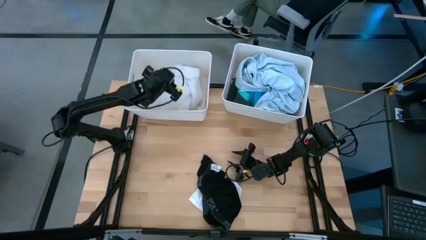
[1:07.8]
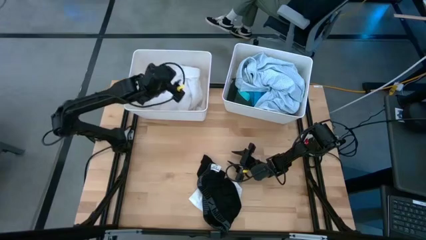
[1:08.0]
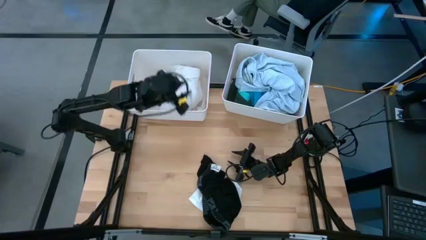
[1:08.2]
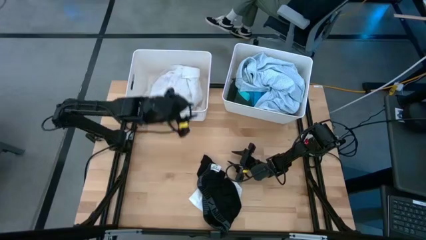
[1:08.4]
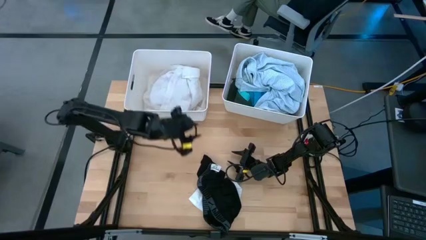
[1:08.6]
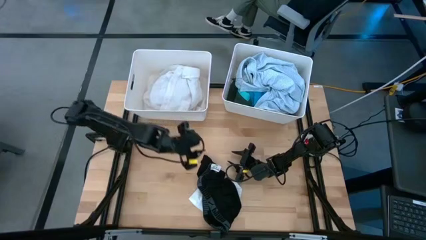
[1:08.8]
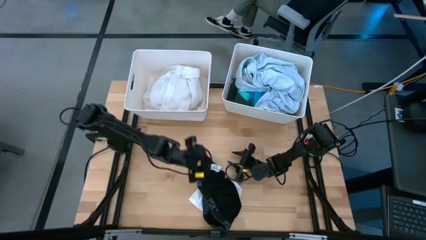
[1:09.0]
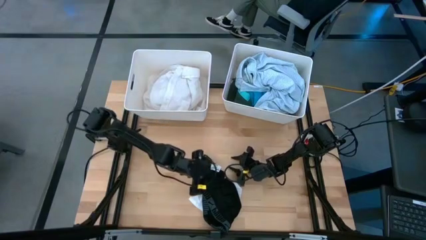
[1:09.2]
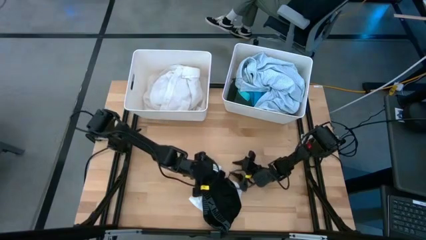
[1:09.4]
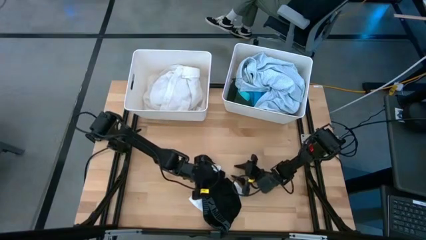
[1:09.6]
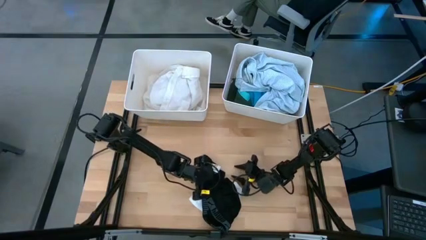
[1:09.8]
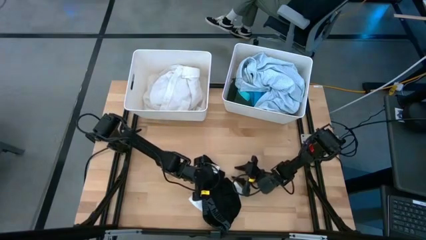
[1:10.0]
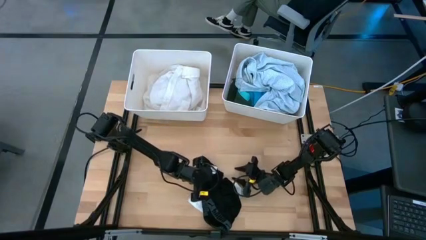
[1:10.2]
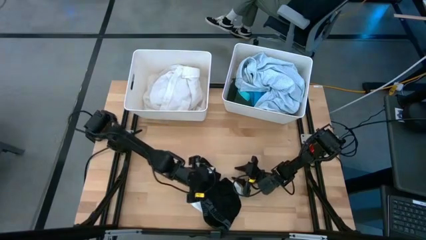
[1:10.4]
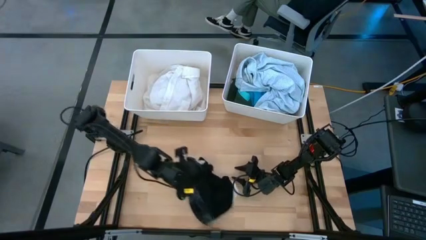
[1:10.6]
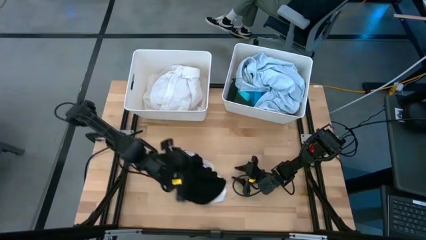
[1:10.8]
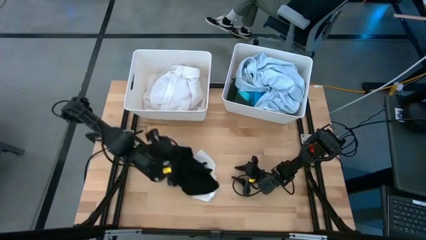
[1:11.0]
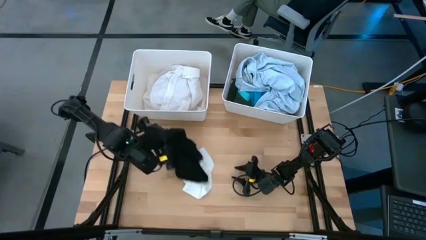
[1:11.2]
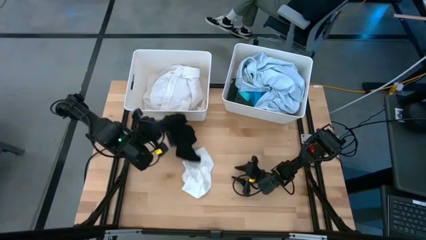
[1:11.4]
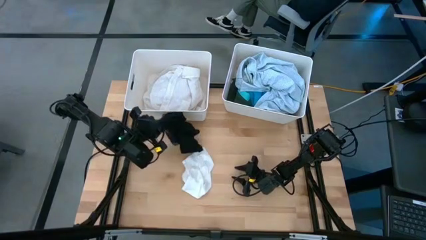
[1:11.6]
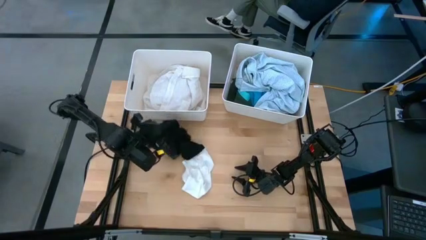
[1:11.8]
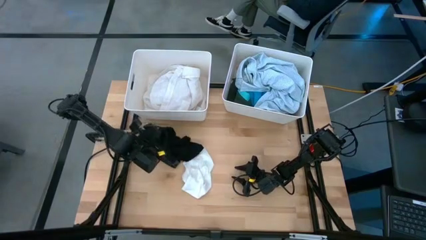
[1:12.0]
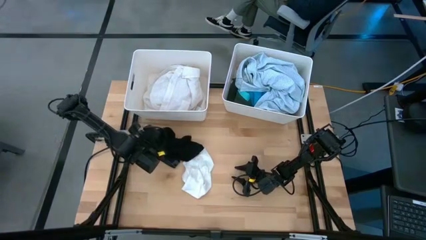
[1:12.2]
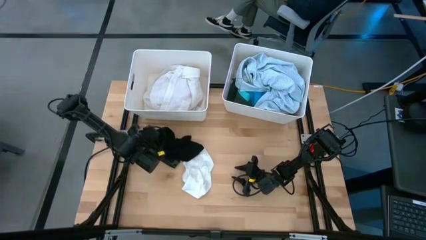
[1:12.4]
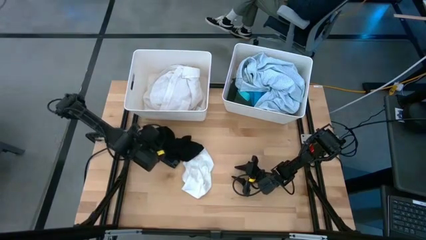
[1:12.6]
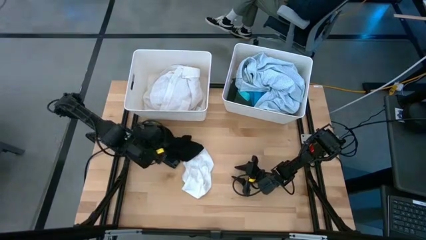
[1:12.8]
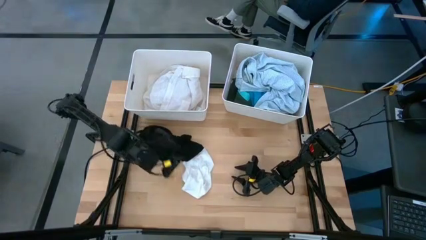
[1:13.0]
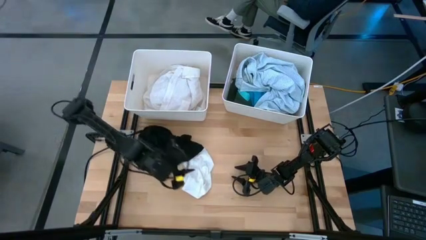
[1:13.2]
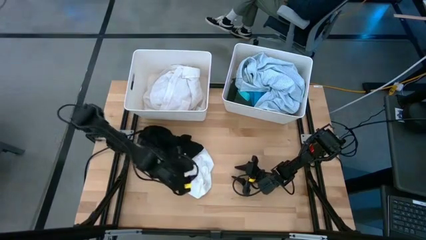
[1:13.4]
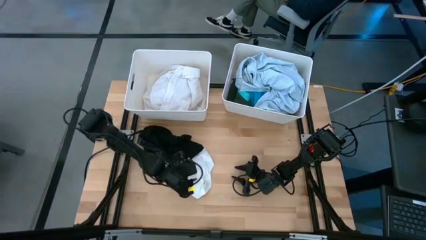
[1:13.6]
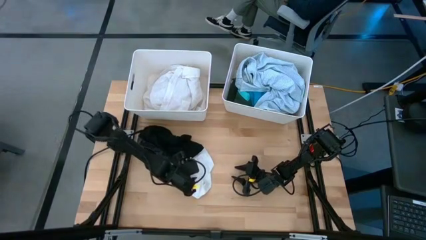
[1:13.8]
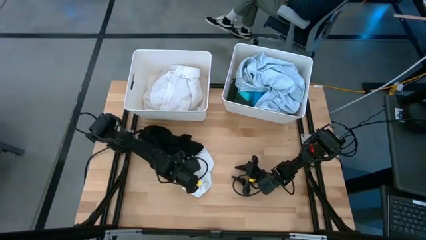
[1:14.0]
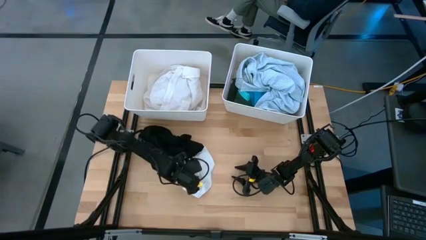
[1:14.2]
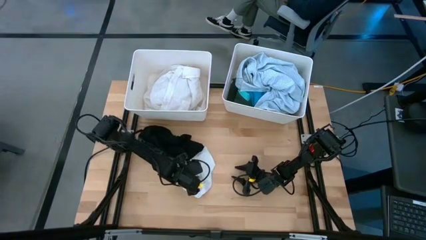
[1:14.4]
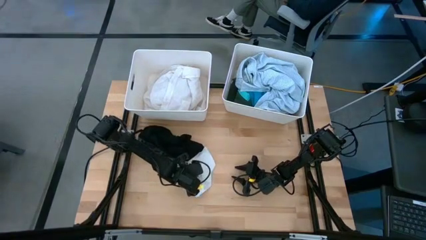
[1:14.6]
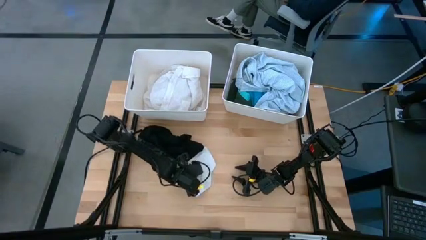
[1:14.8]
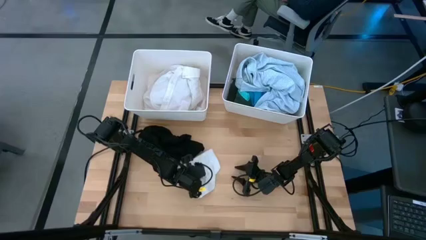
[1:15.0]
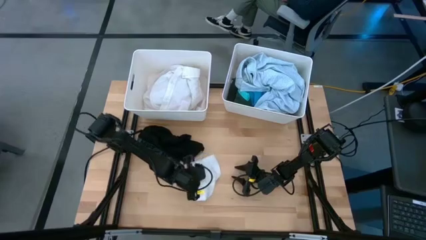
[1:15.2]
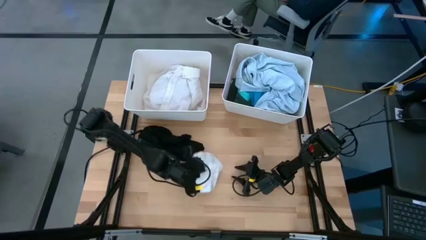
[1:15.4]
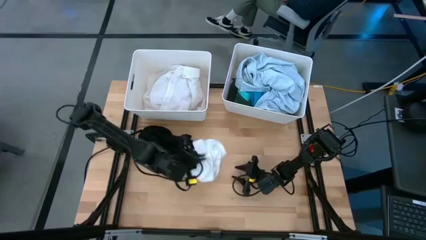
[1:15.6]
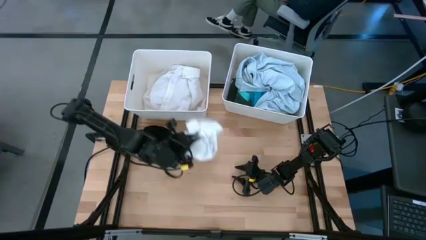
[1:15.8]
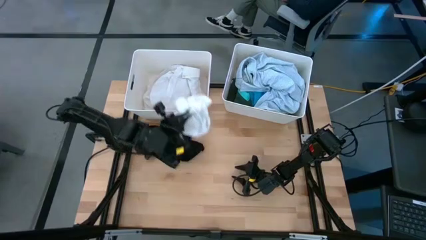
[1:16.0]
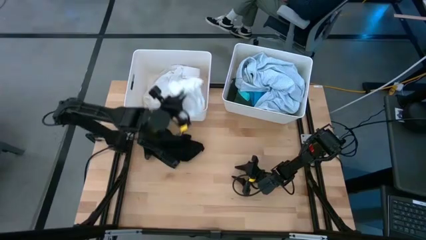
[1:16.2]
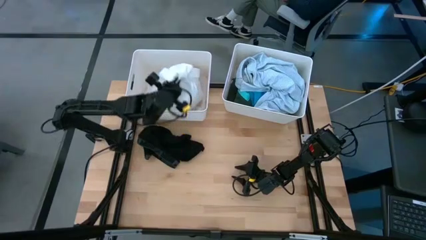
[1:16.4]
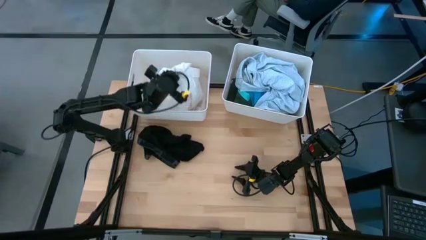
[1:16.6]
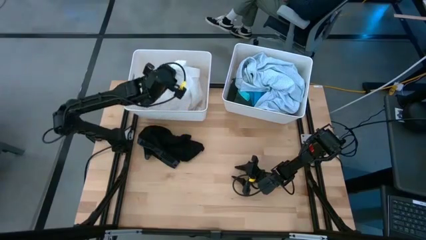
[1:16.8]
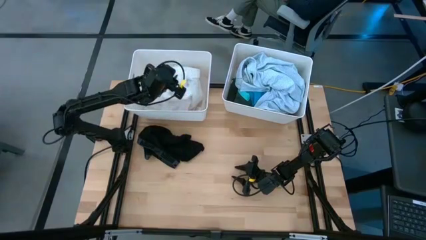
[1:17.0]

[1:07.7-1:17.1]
Task: Sort clothes
Put the white underwear into the left white bin

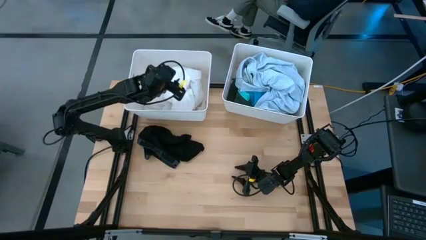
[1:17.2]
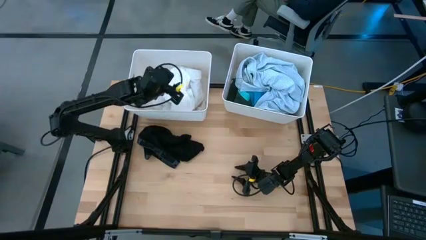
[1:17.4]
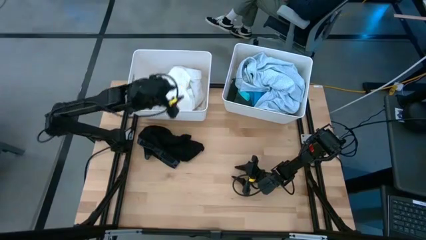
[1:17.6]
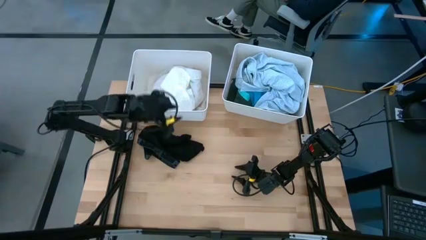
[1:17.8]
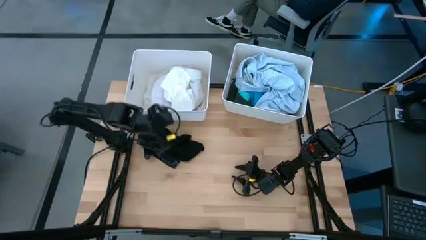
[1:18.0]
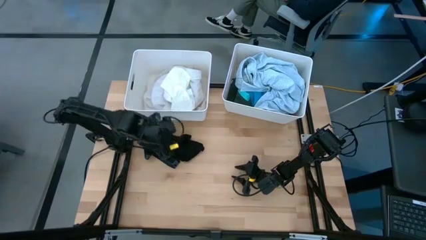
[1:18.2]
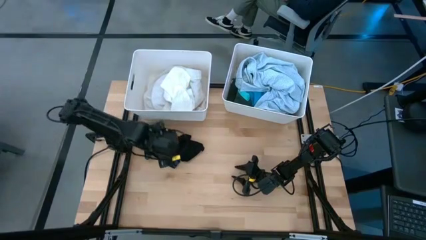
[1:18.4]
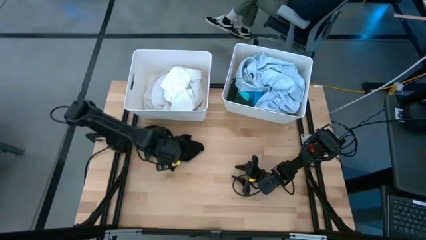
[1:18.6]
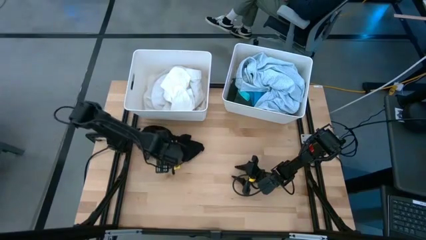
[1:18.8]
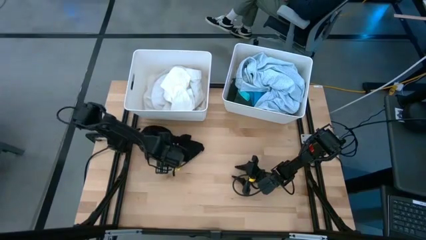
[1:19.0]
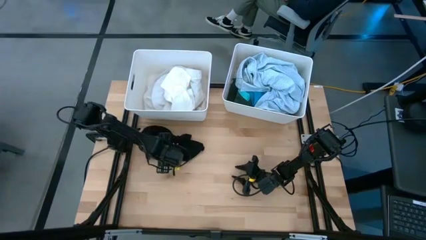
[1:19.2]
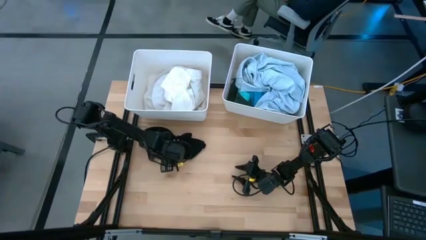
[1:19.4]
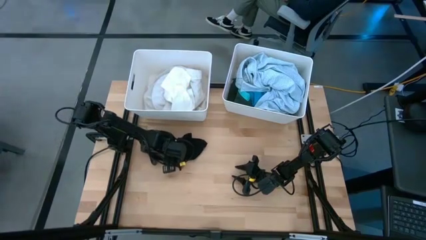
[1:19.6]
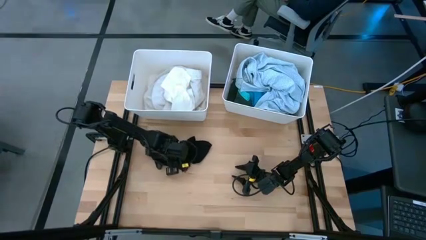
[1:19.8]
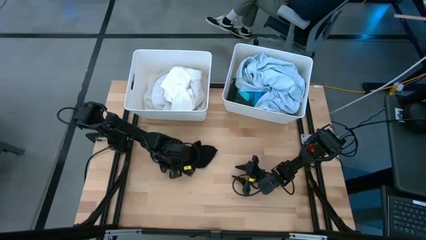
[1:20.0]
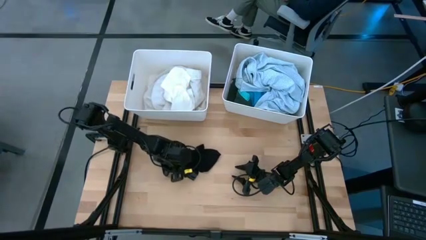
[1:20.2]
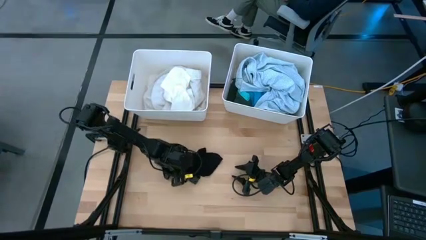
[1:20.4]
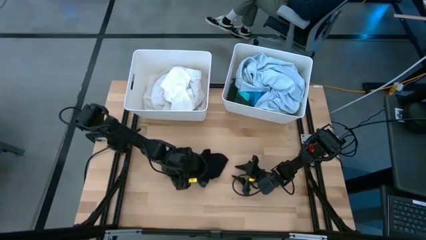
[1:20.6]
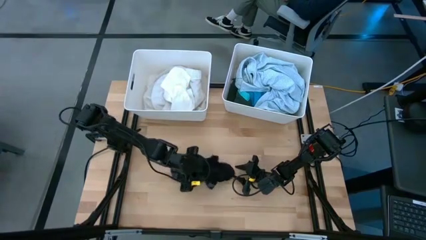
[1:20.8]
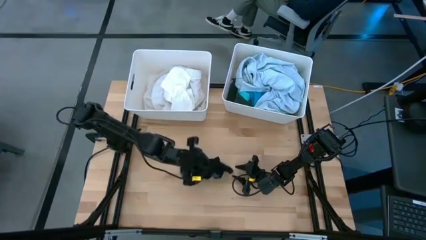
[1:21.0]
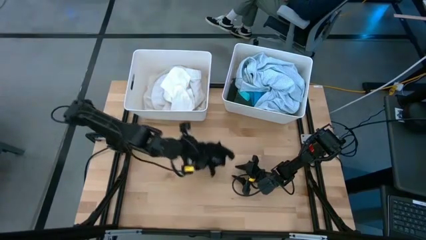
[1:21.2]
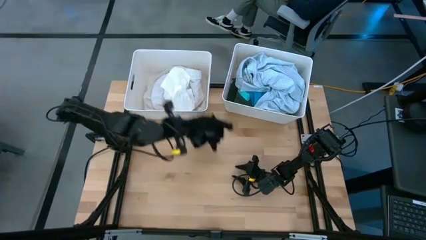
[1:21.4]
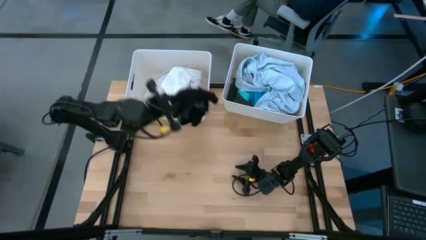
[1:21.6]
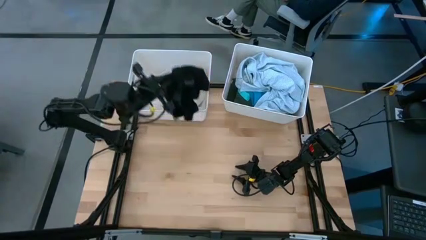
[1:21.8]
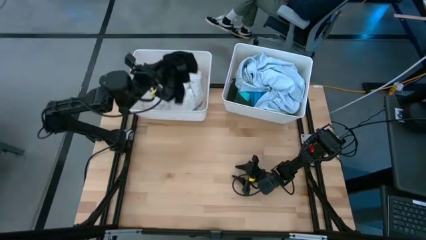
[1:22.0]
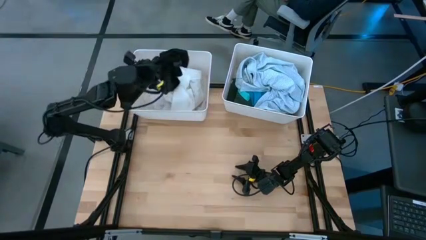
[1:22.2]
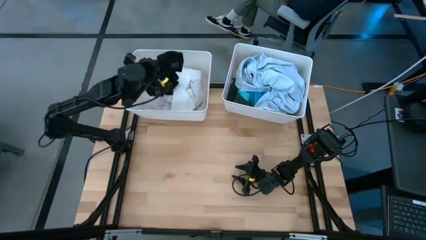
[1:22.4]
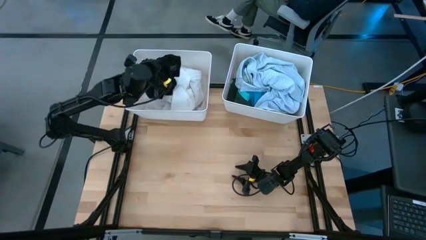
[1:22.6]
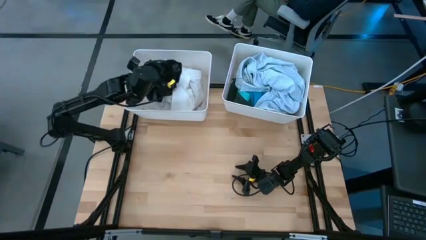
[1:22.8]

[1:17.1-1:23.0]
Put the black boxer into the left white bin

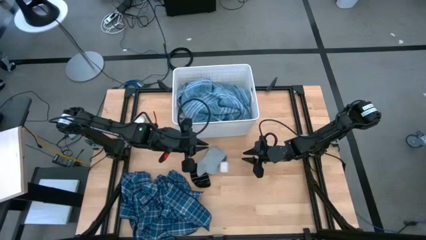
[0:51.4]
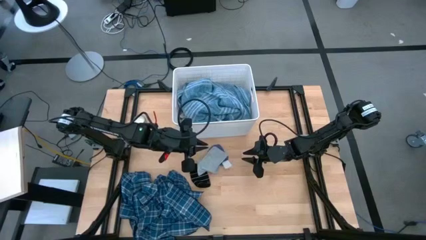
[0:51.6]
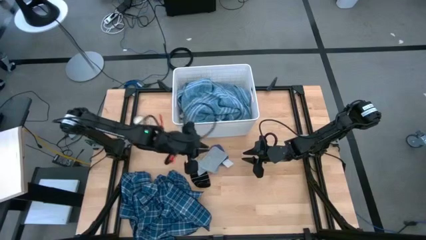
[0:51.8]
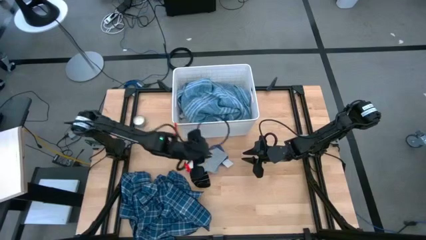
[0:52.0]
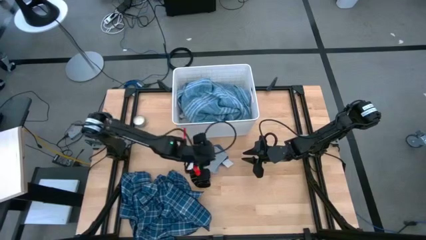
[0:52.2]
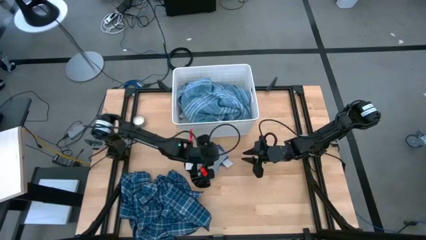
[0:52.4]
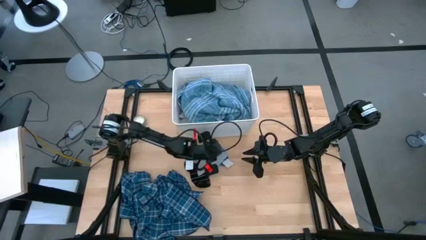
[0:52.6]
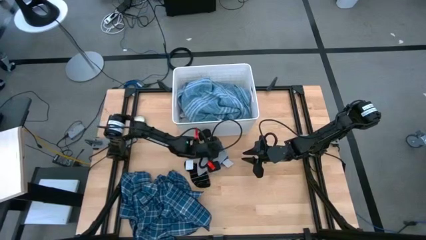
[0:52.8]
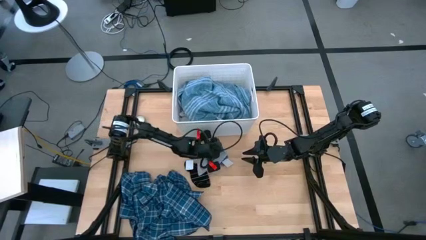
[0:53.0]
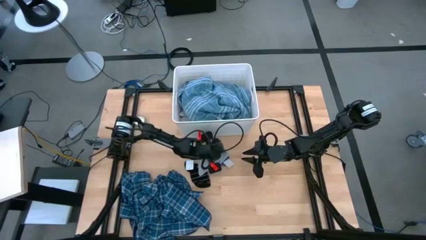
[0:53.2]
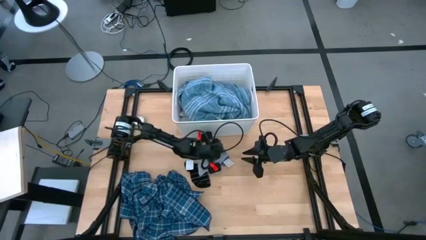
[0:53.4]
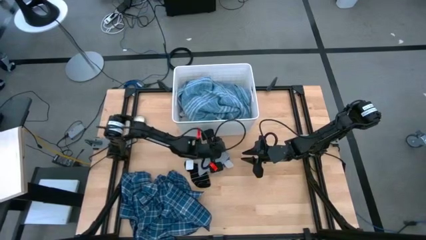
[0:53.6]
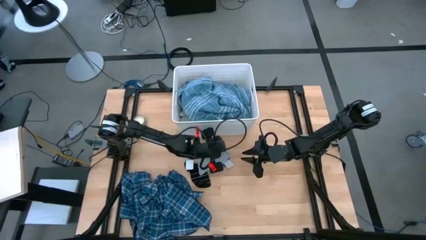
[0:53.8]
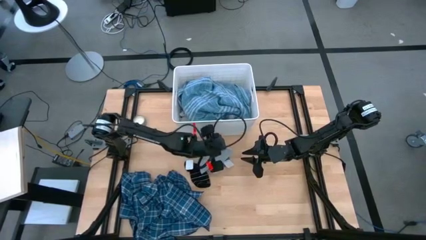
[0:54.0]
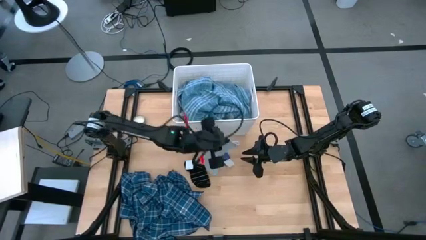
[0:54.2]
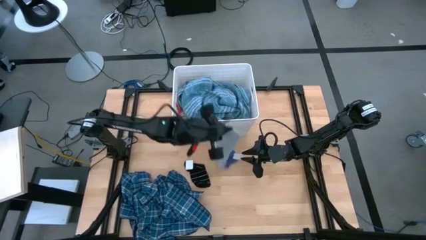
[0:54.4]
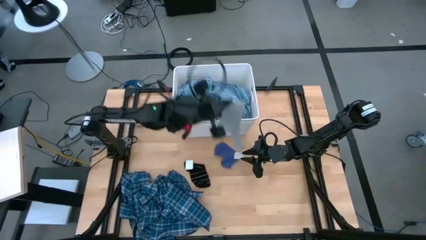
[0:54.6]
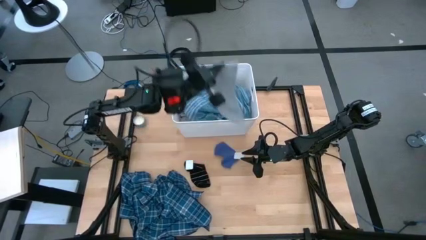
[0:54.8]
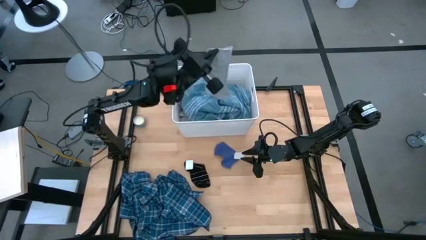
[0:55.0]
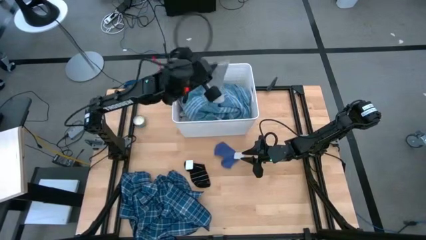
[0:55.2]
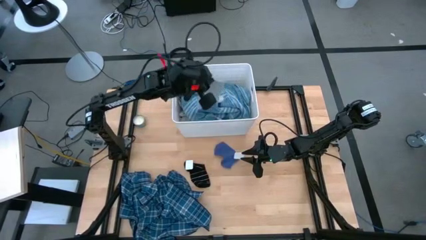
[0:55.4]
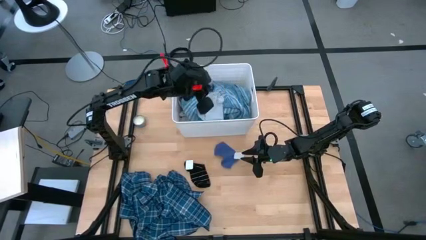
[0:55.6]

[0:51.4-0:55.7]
Task: Sort clothes
Put the gray sock into the white bin
